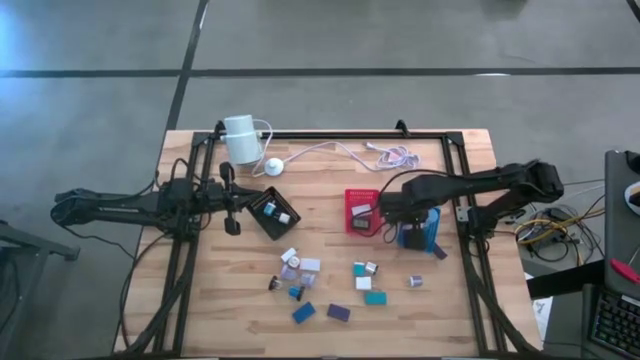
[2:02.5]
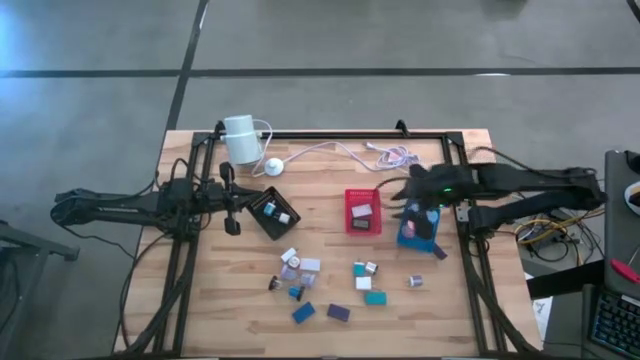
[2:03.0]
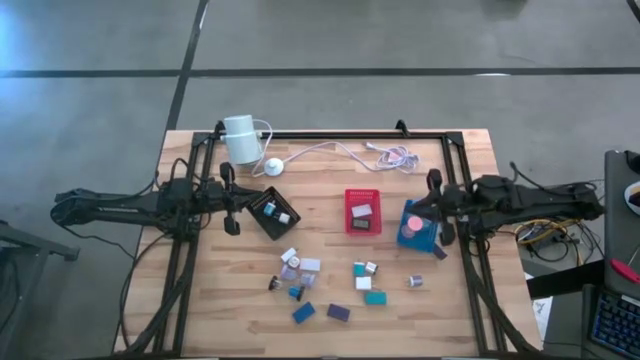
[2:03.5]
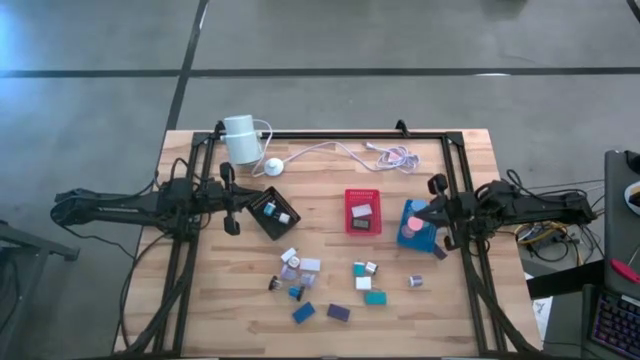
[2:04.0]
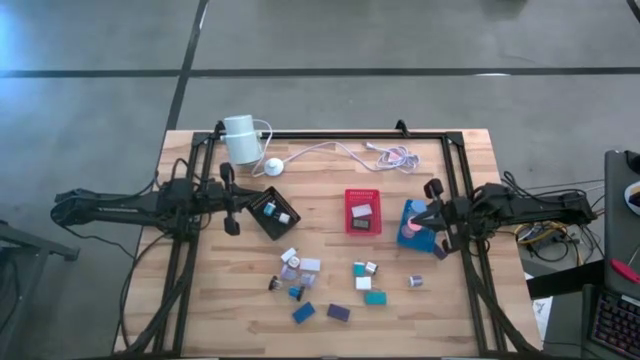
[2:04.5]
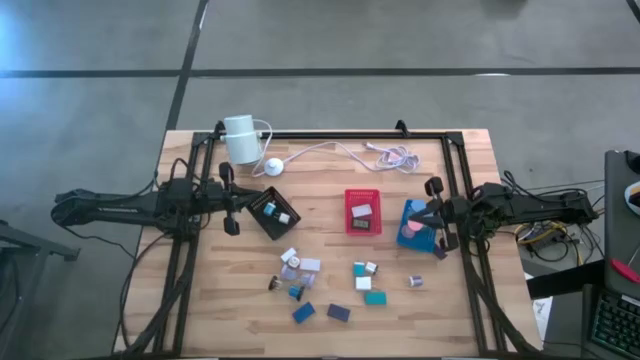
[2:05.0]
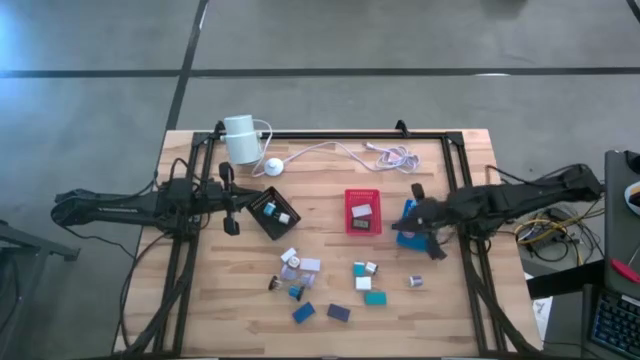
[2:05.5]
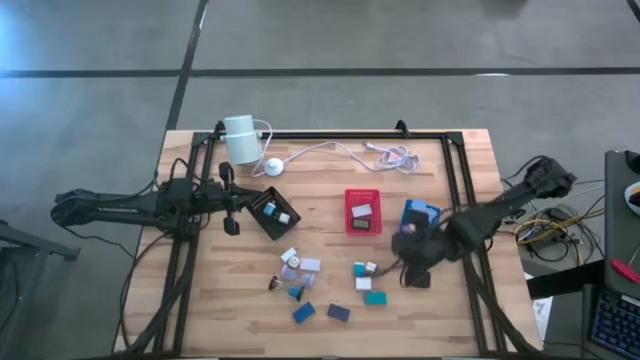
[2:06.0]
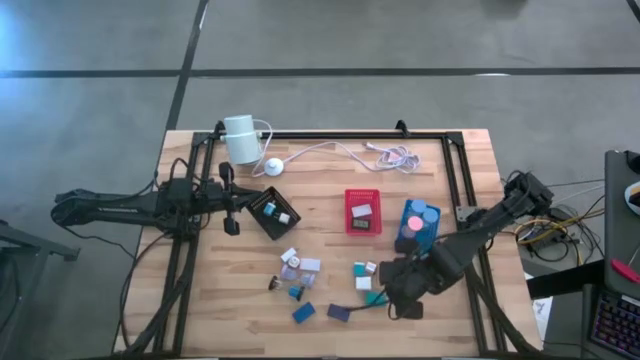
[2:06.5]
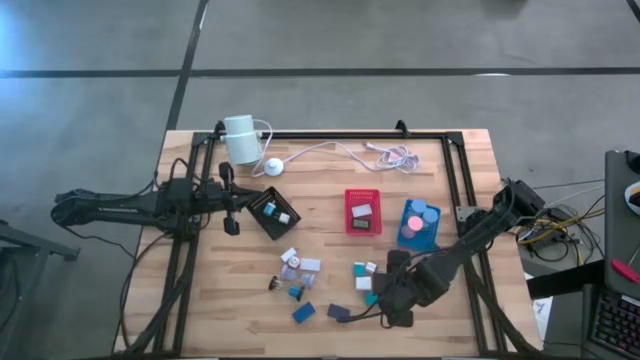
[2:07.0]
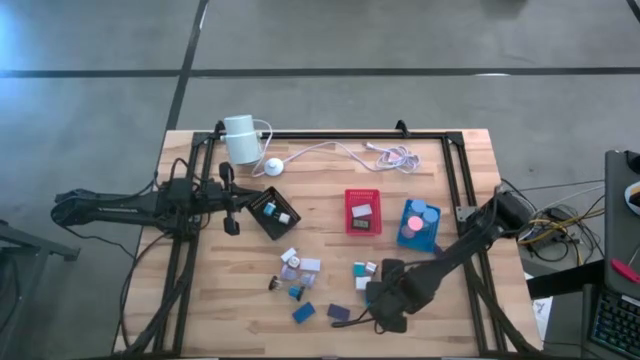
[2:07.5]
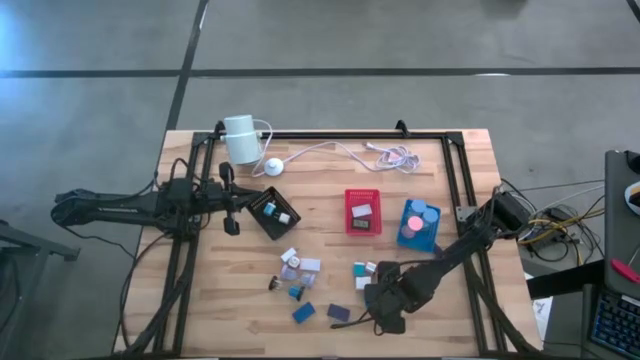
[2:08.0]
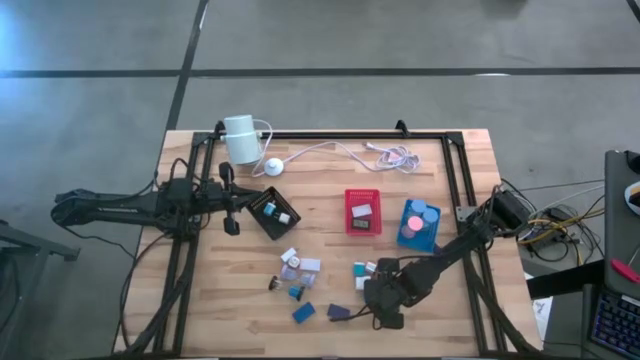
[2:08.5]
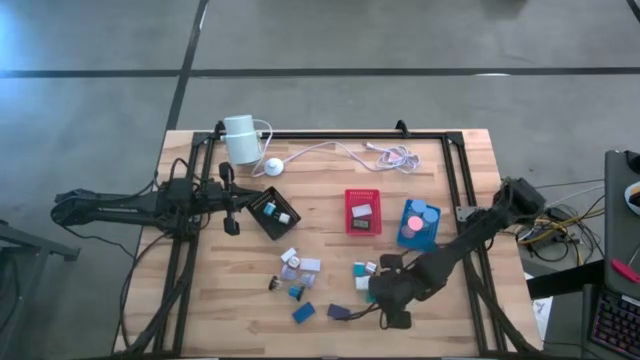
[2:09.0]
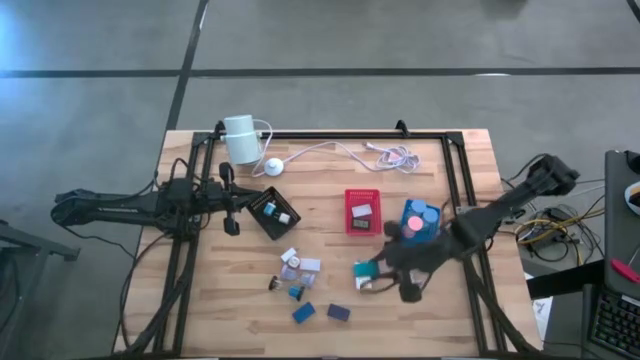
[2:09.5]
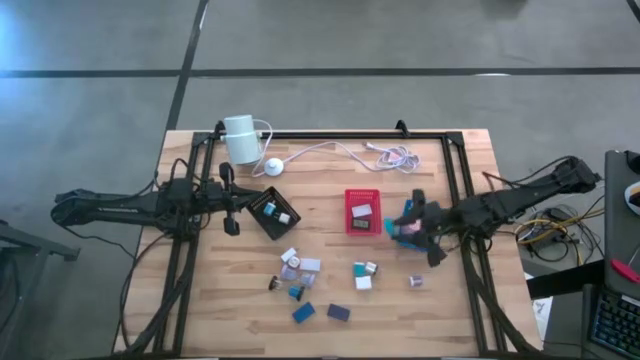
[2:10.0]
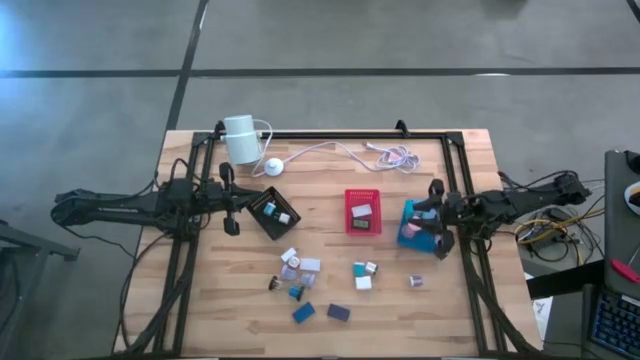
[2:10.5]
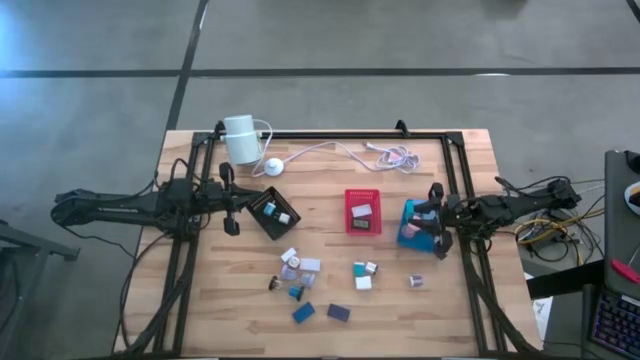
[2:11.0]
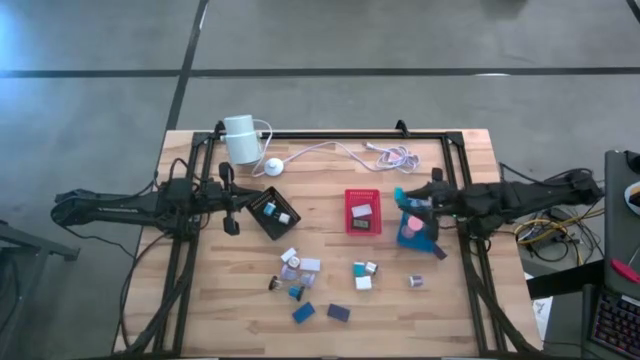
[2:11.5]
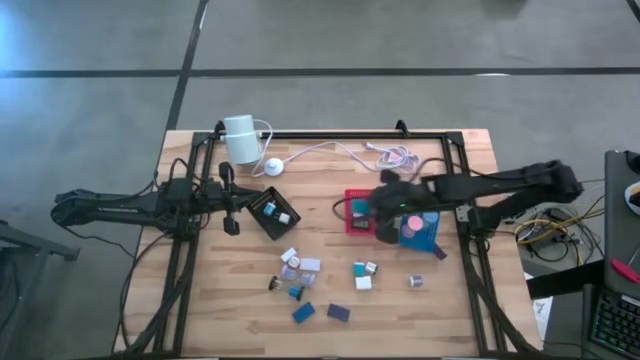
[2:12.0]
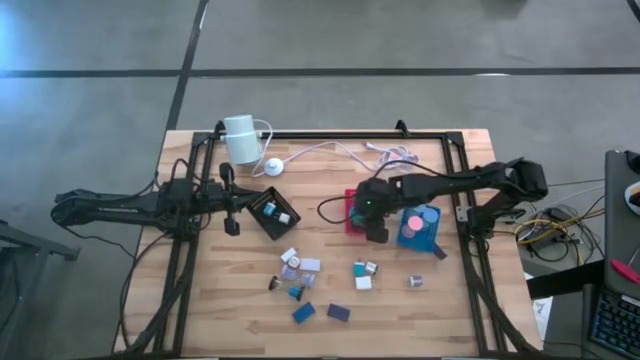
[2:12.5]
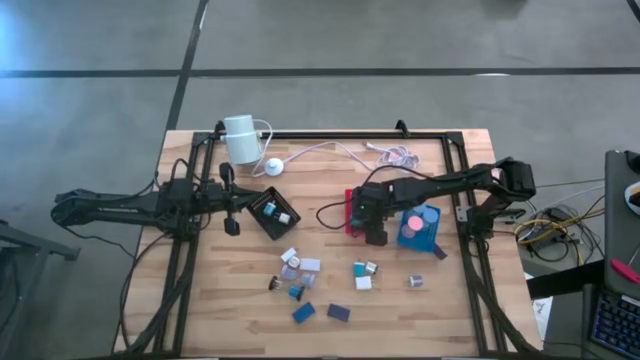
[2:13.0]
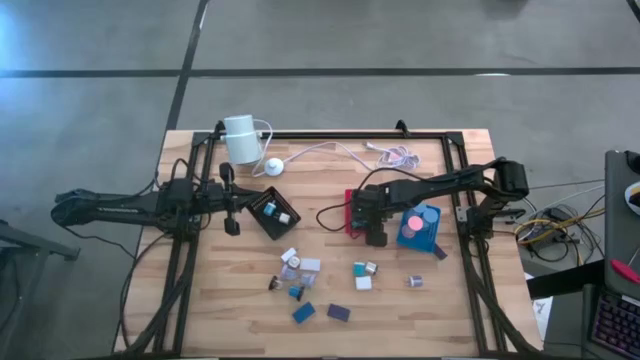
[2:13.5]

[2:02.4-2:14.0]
Task: Pick & Place Office items
Put the light blue digital clock into the red bin

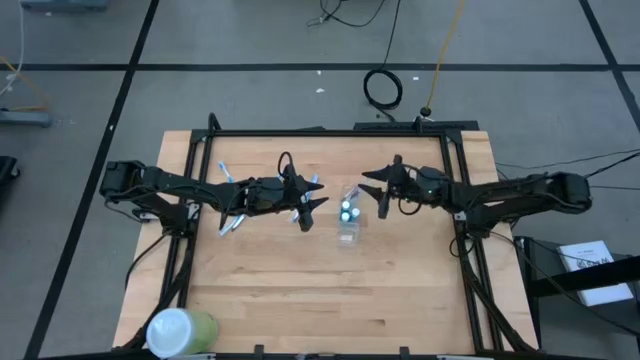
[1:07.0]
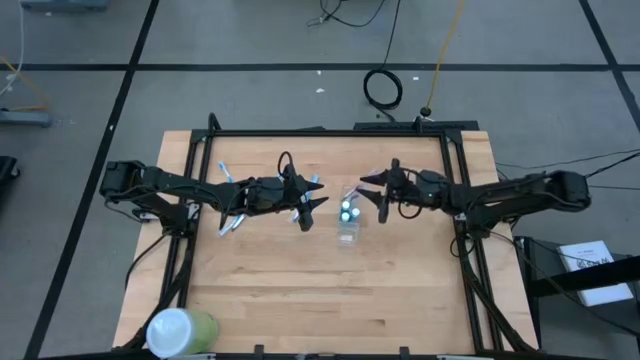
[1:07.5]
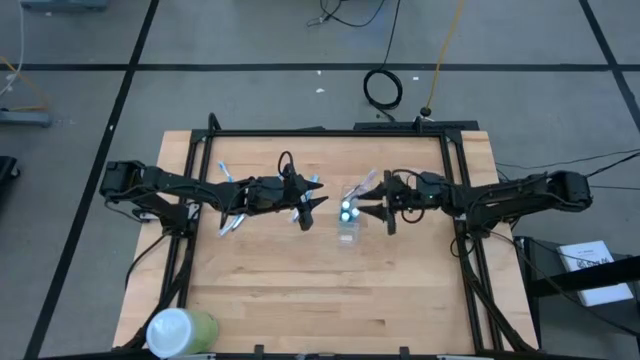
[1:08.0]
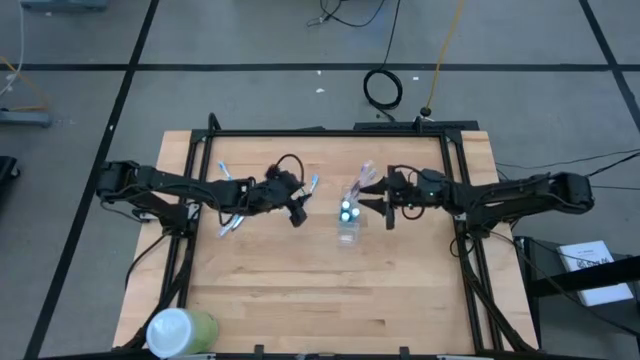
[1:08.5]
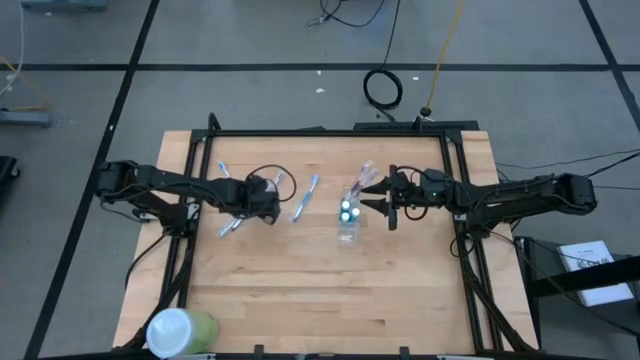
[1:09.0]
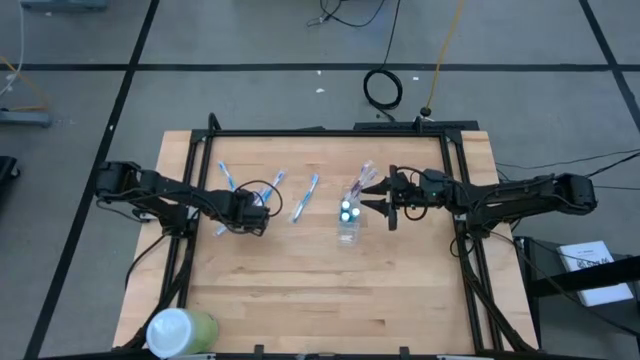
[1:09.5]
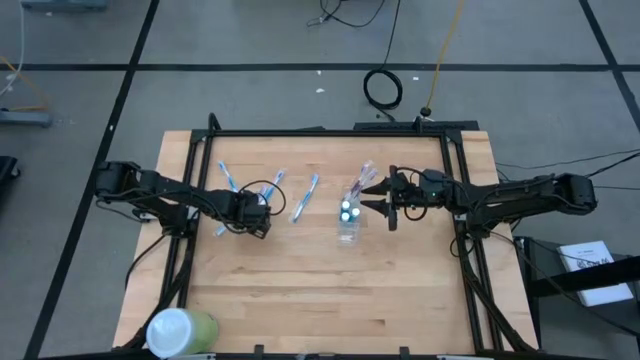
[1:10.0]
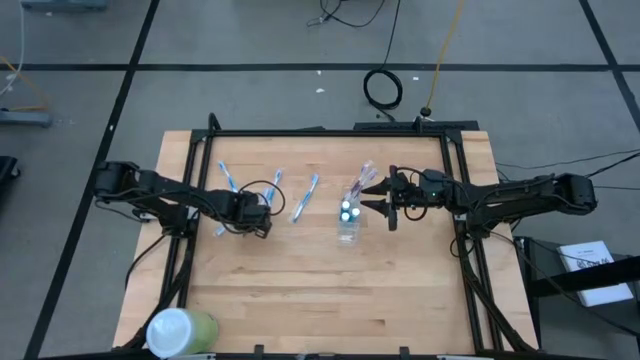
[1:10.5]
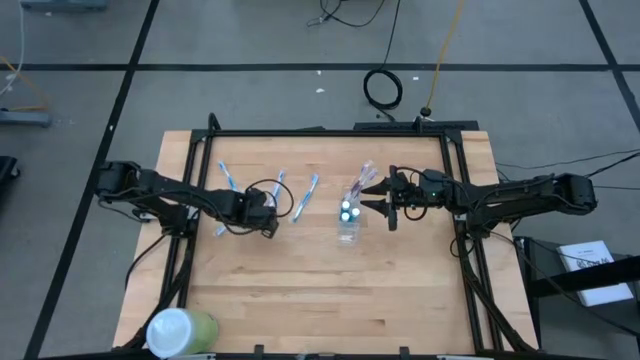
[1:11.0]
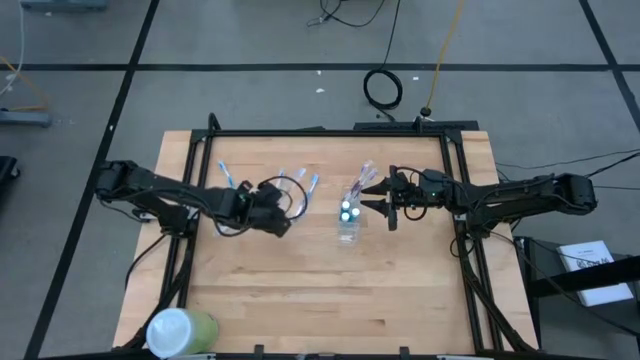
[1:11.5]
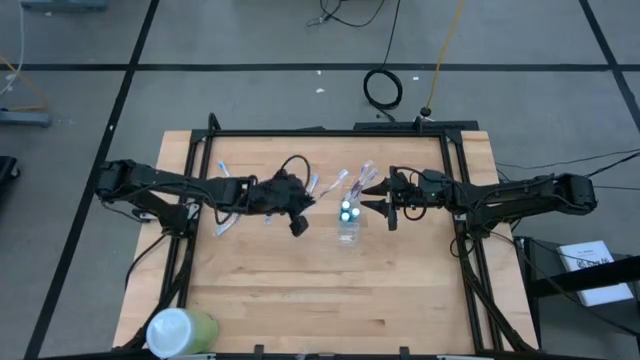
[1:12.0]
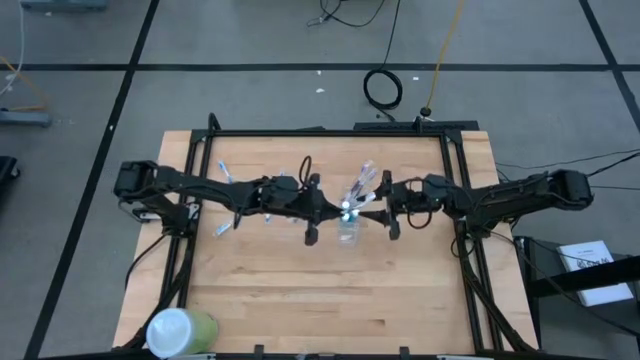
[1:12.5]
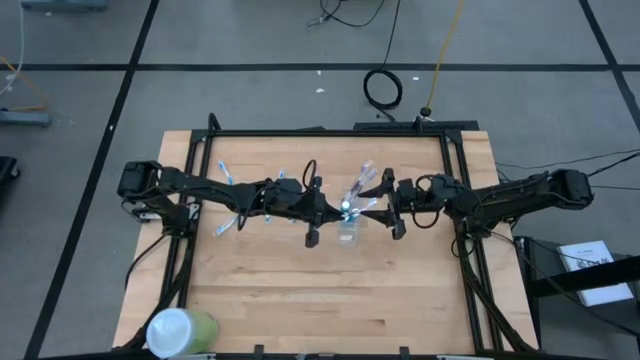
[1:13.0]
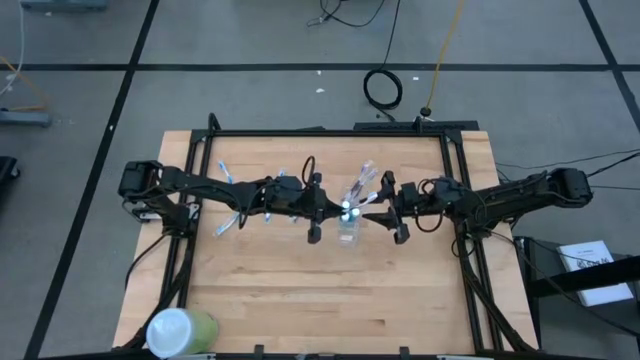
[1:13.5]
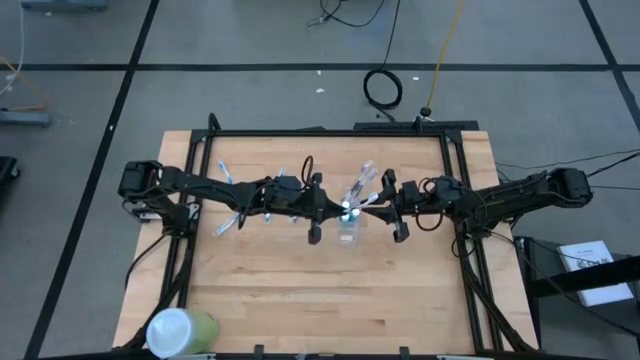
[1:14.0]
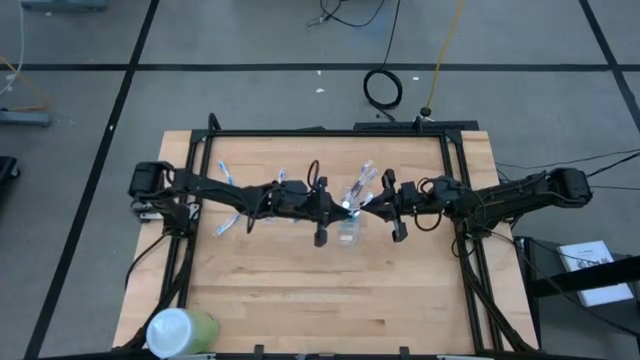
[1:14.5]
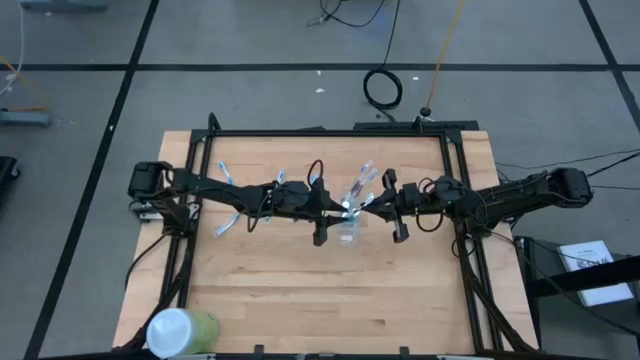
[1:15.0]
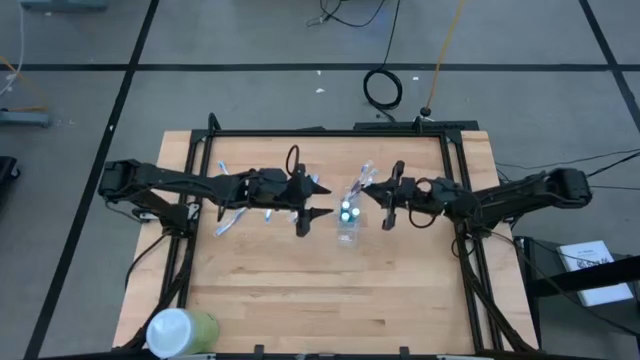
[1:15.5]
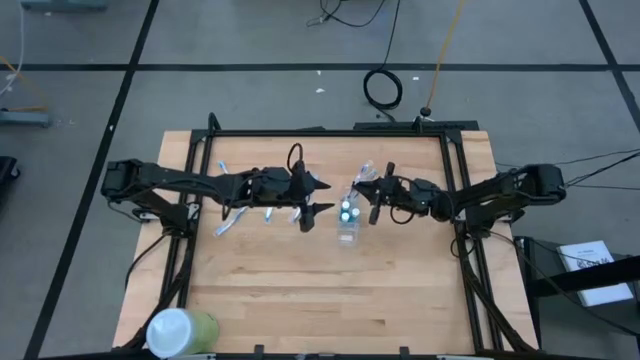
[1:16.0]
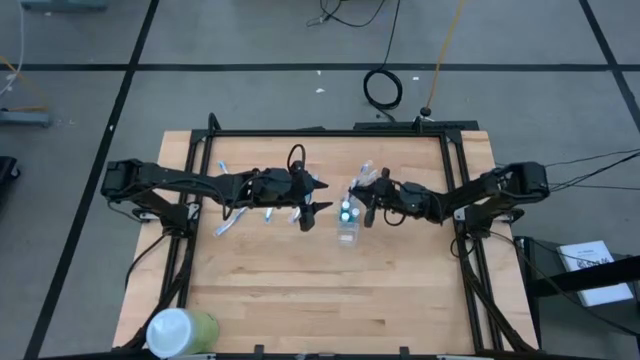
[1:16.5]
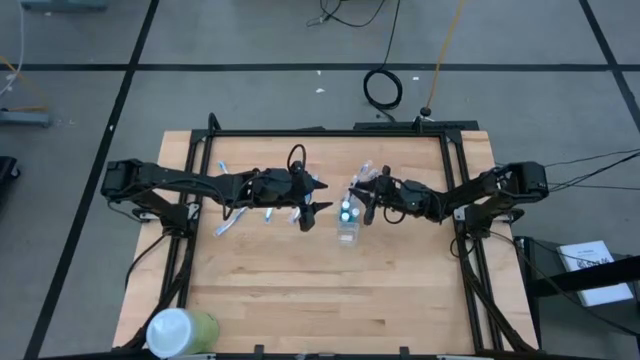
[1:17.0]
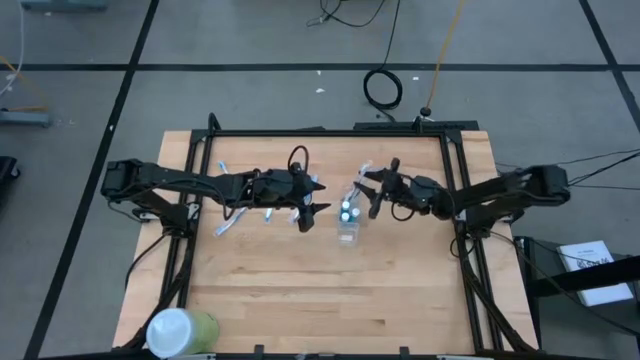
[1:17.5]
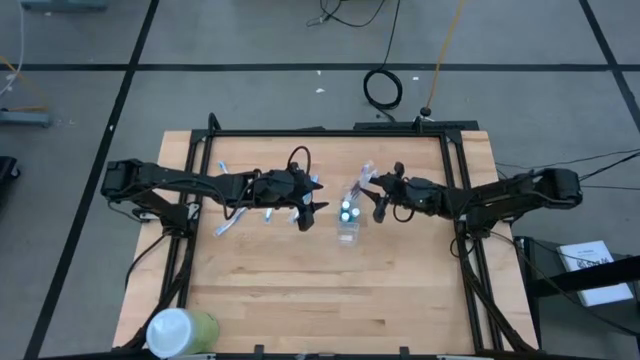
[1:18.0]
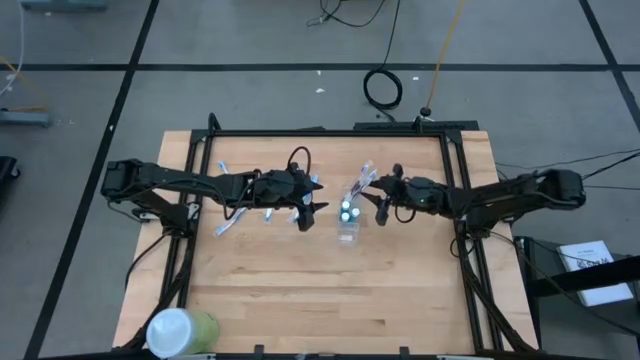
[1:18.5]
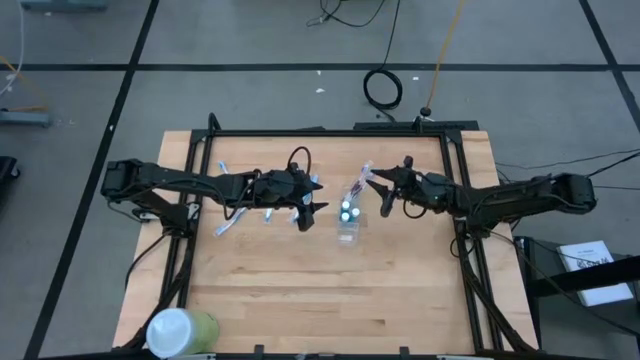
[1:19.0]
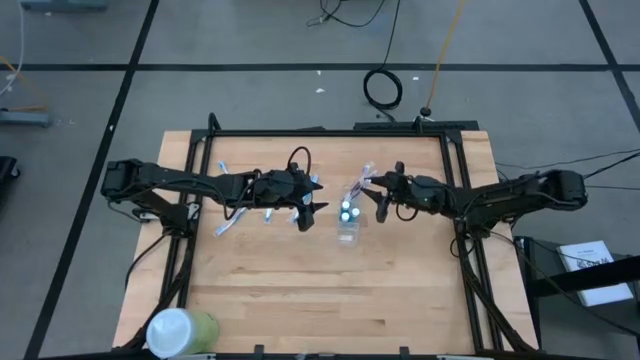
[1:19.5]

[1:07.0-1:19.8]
Task: Pick & Place toothbrushing station
Put the violet toothbrush into the transparent organizer
